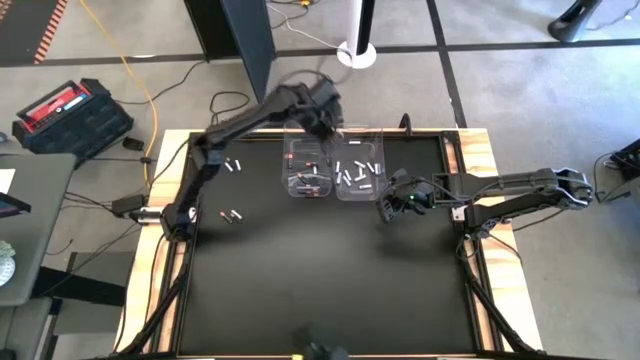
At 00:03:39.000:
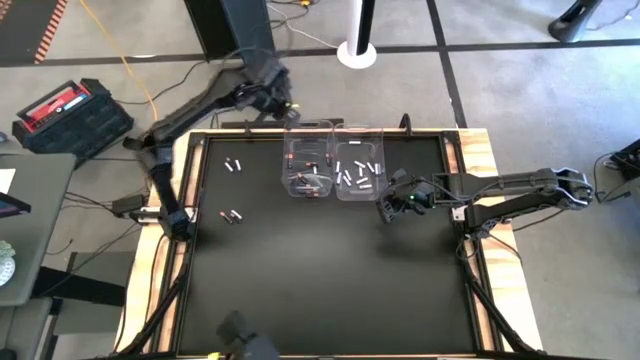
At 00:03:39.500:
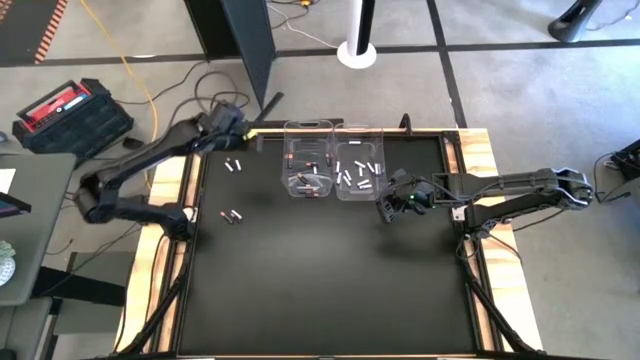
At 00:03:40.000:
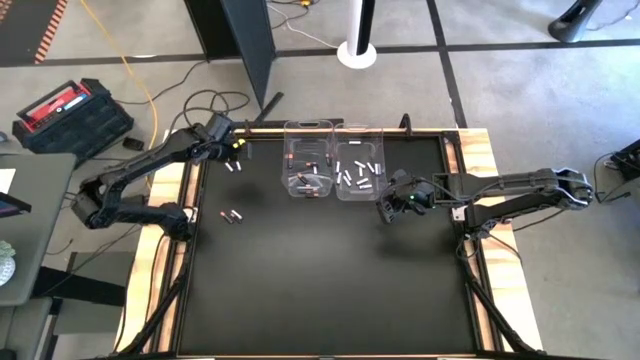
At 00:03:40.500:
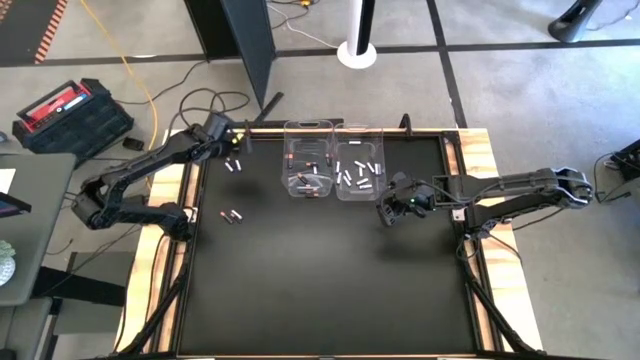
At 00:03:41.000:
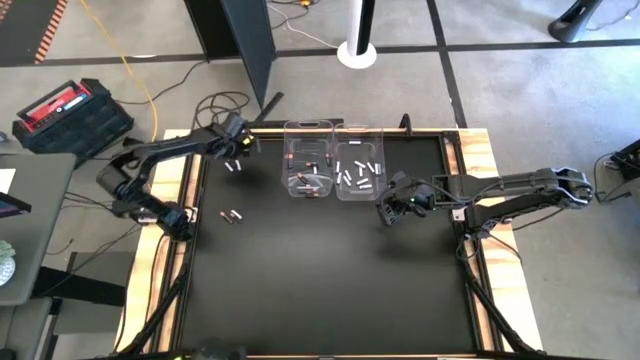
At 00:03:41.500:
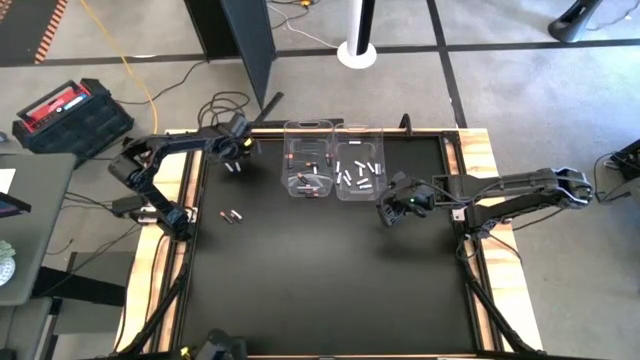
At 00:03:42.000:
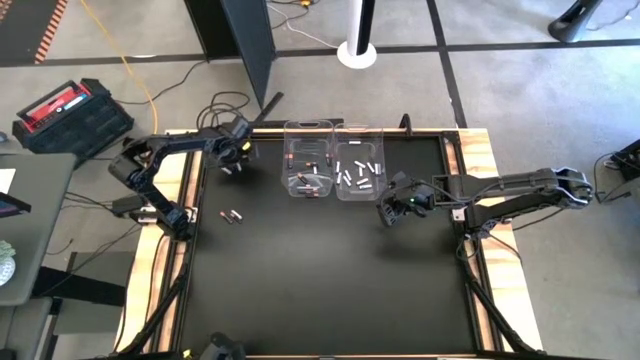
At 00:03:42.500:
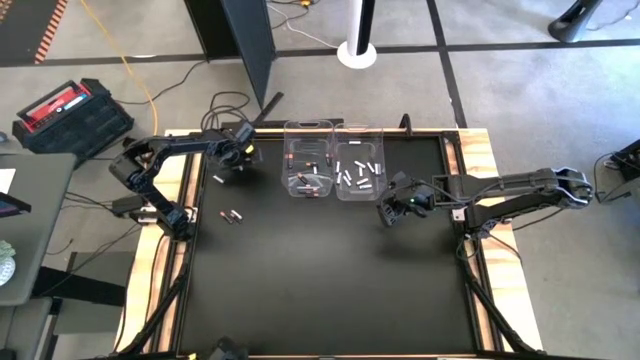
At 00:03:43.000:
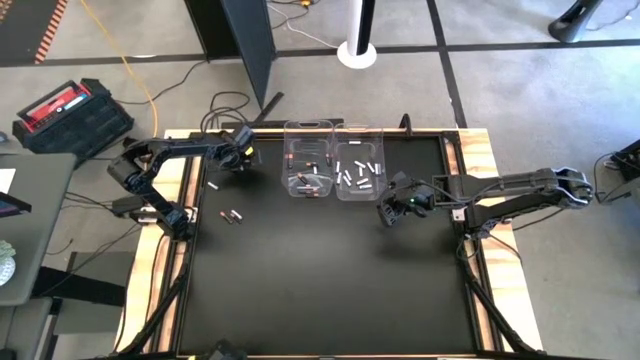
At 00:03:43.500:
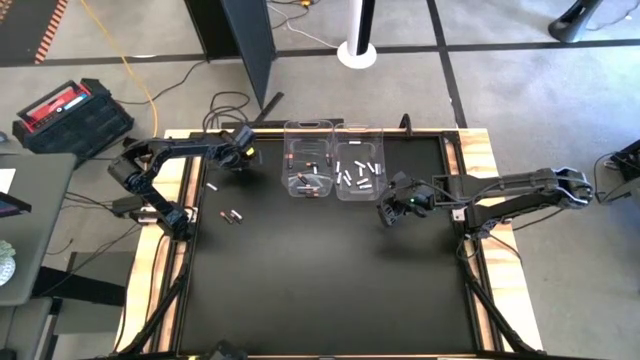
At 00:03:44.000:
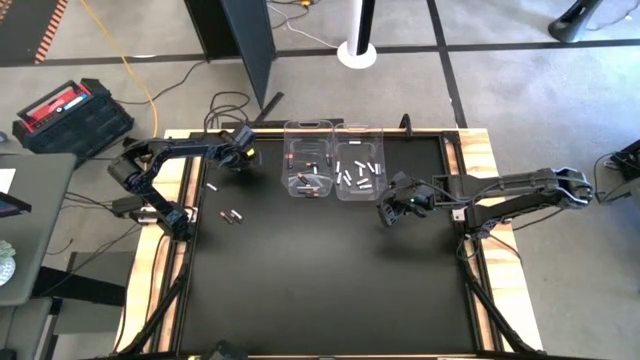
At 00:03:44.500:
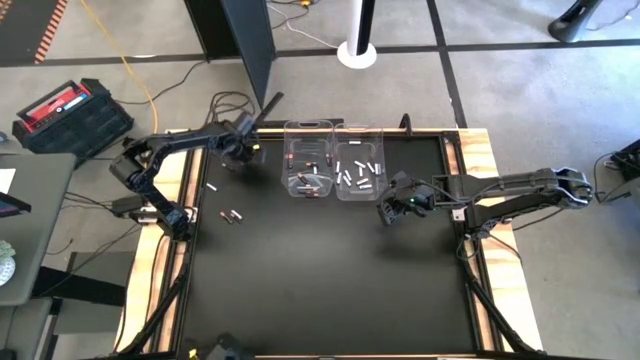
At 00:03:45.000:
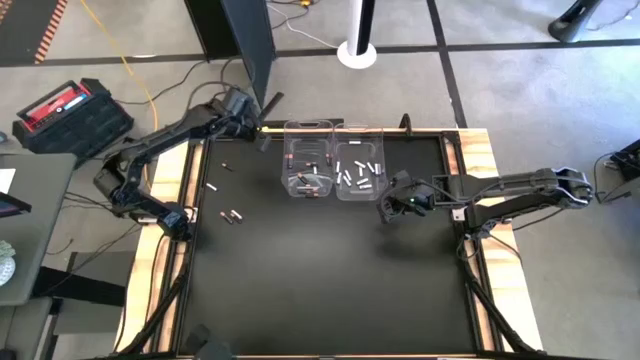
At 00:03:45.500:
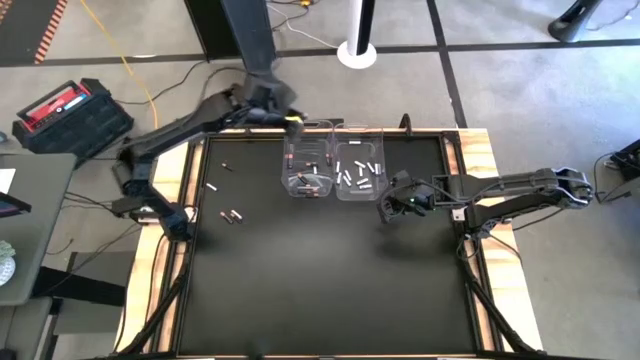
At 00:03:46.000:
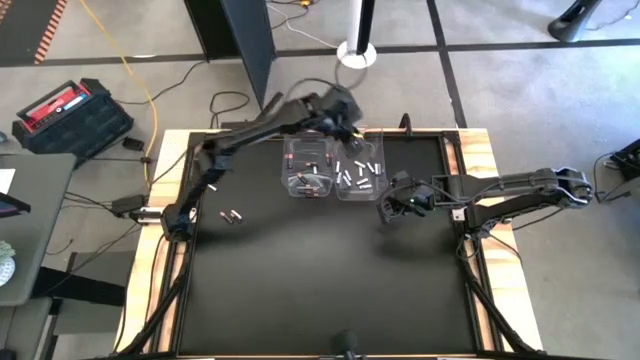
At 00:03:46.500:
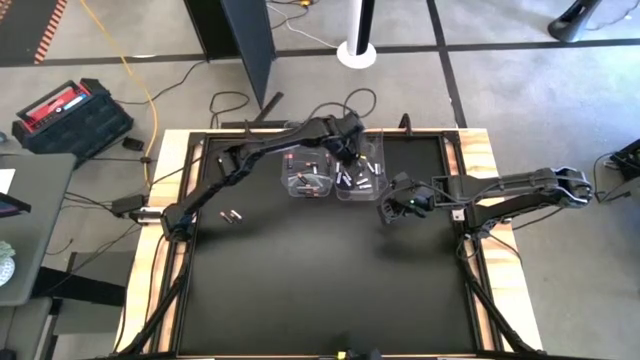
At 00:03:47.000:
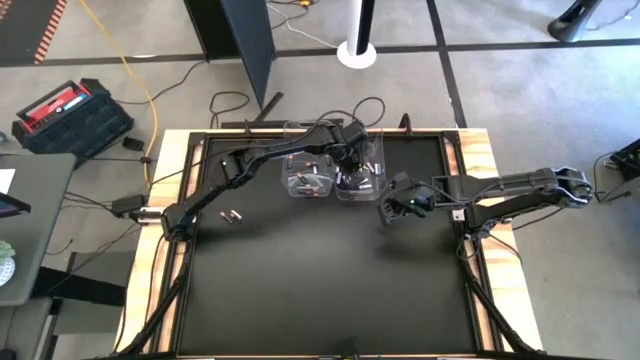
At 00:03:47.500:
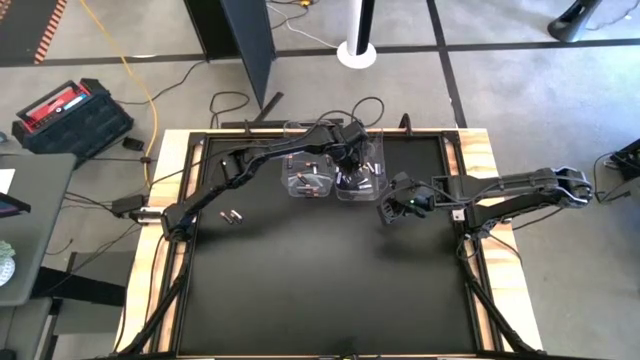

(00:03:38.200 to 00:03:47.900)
Task: Sort batteries
Put the white battery into the right transparent bin

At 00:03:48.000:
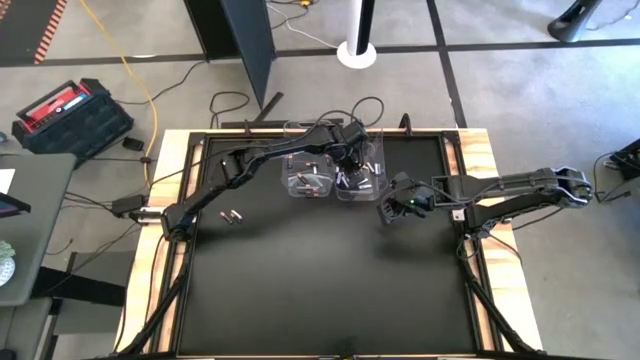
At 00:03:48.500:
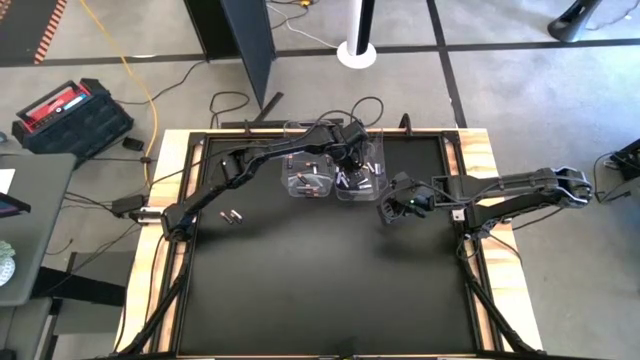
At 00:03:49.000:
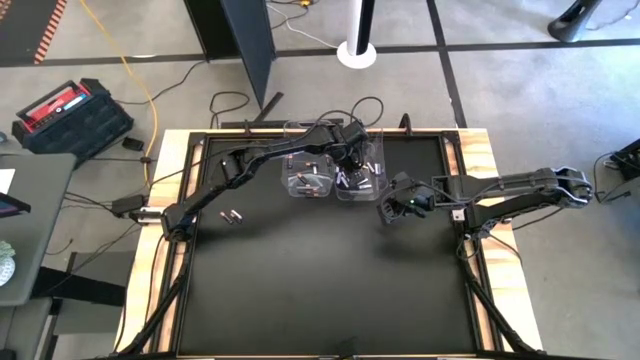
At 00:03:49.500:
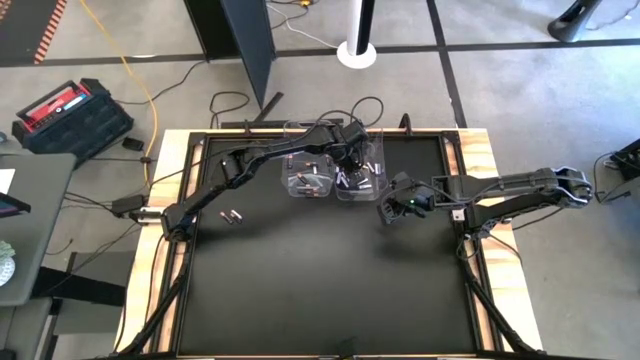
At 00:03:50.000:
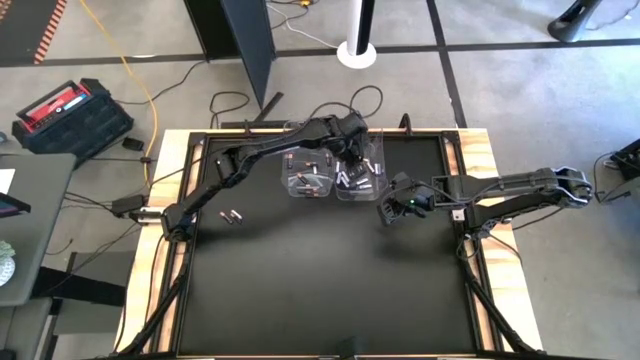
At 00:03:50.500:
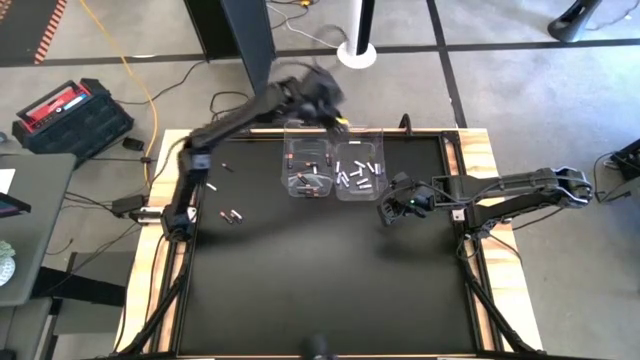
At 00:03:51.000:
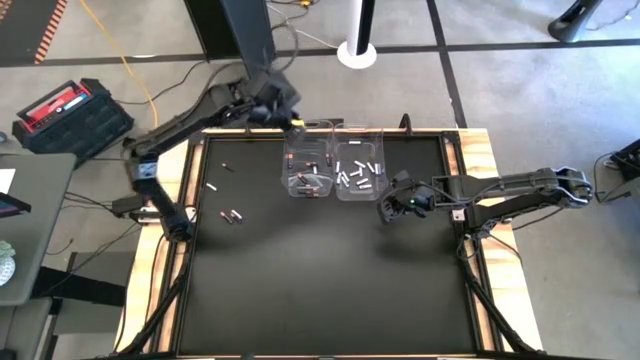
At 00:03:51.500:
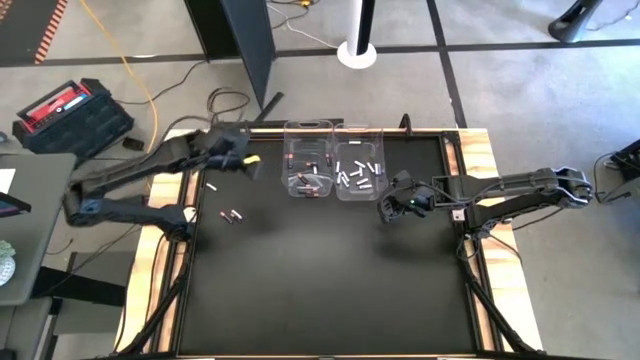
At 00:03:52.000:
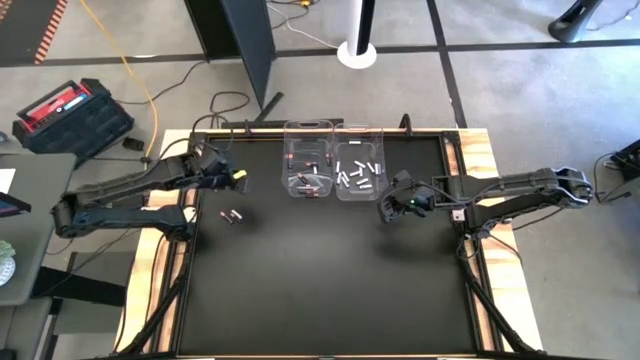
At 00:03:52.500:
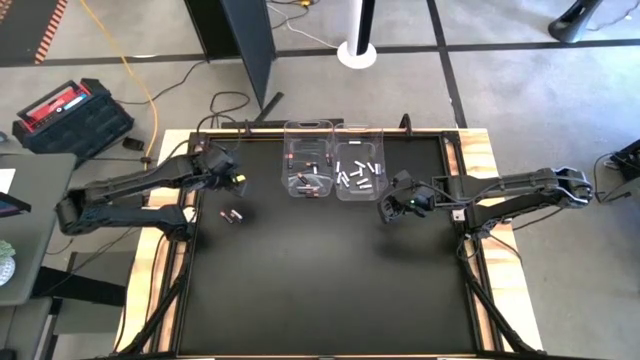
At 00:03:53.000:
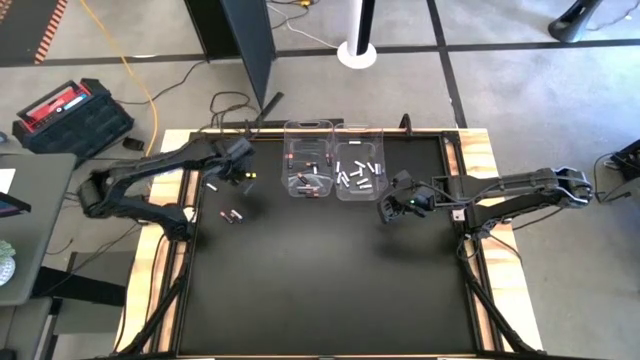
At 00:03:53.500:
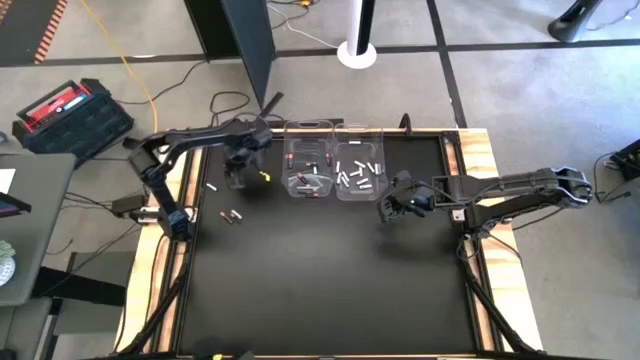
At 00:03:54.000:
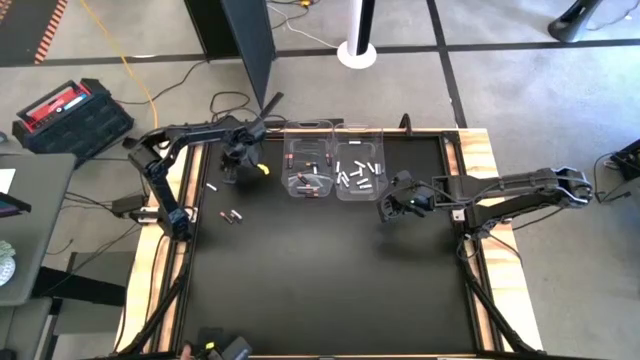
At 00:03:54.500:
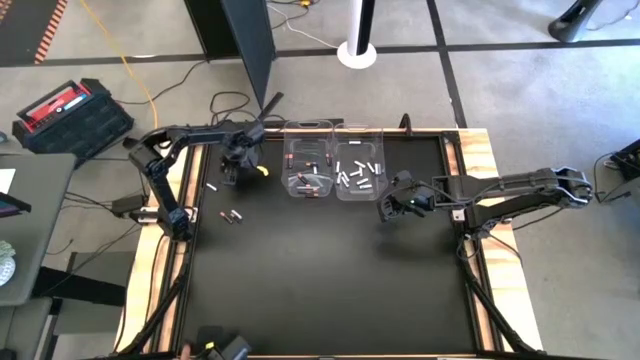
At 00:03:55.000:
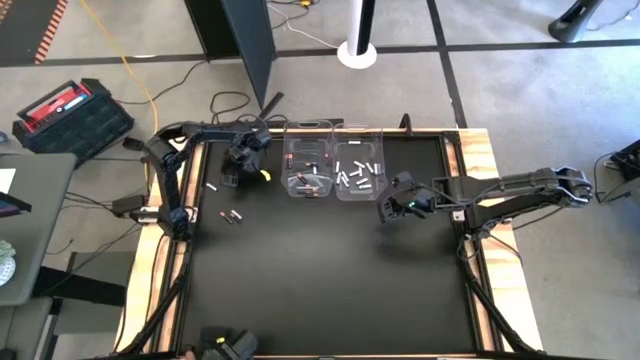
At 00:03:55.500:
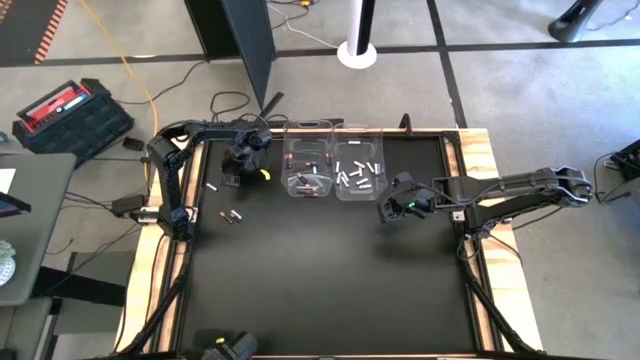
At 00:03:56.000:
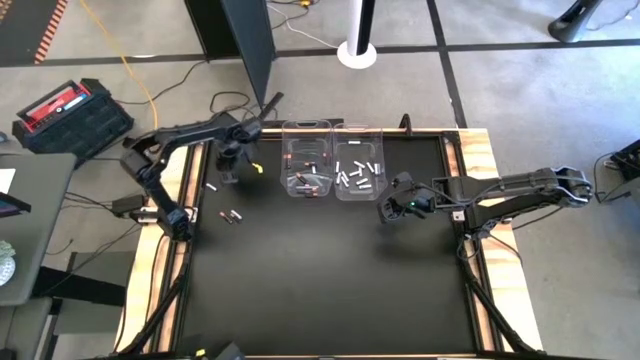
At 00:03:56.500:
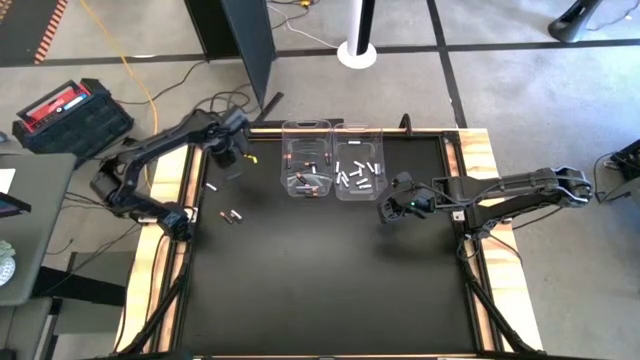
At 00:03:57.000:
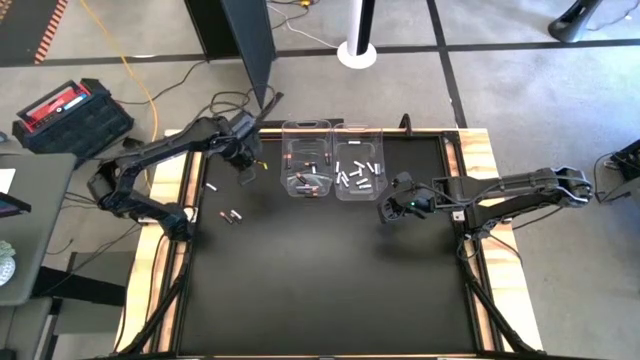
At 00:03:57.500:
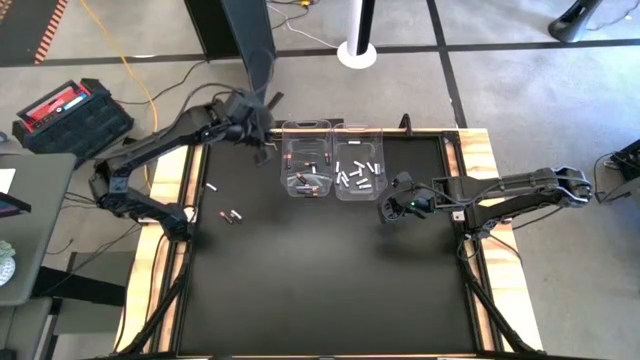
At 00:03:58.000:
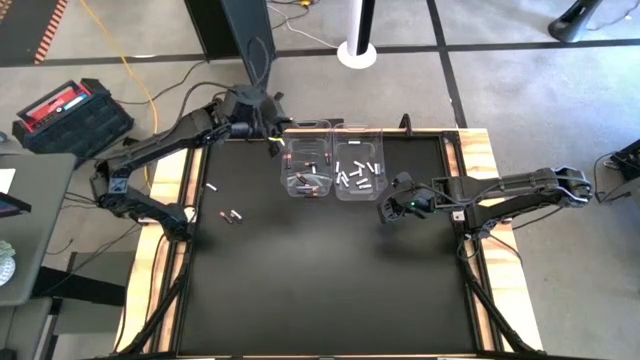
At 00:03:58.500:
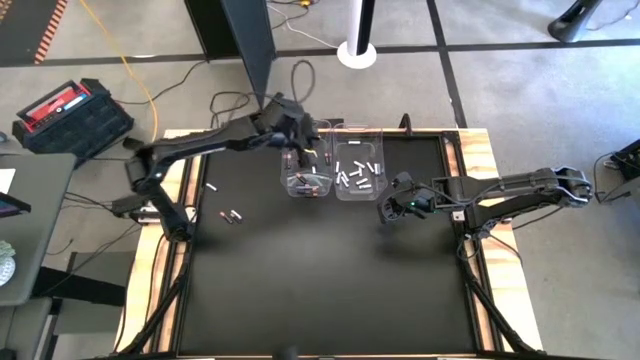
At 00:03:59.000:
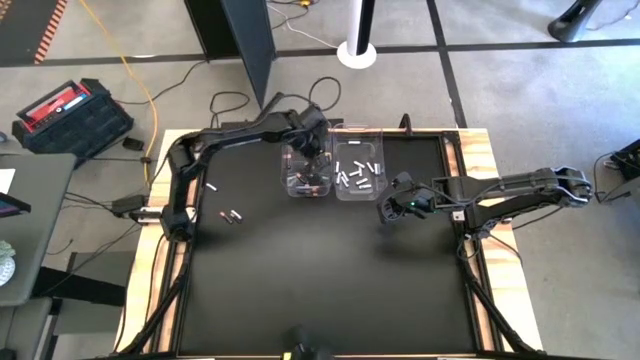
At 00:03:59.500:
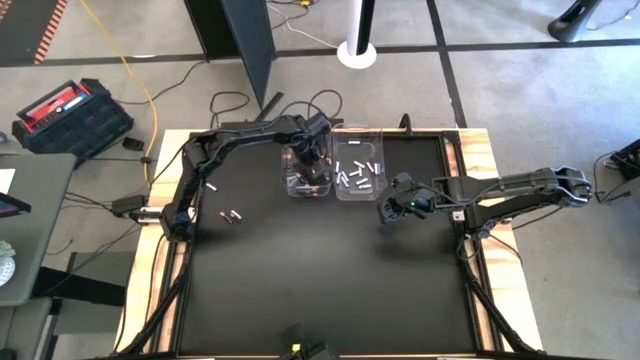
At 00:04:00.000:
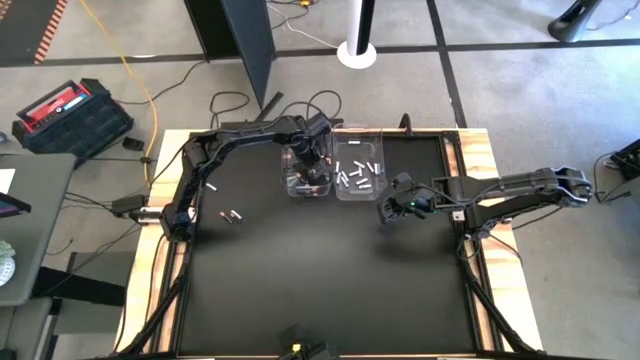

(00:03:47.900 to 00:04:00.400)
Put the black battery into the left transparent bin
